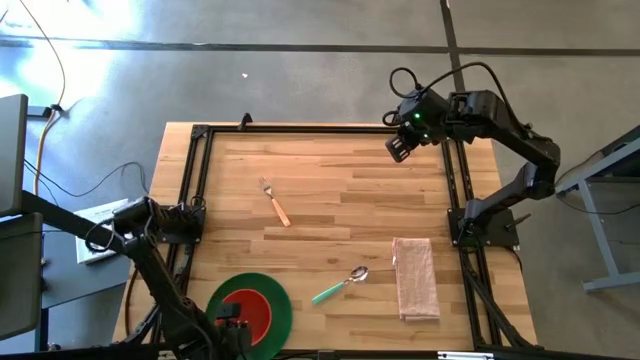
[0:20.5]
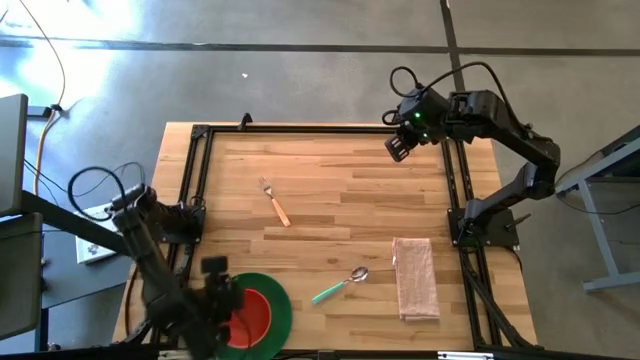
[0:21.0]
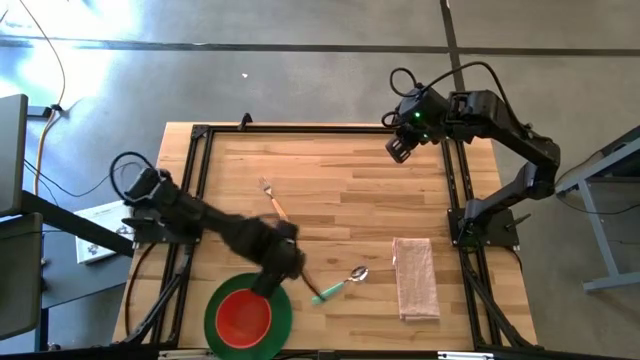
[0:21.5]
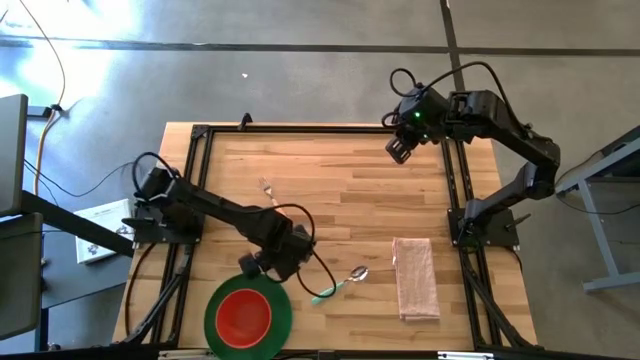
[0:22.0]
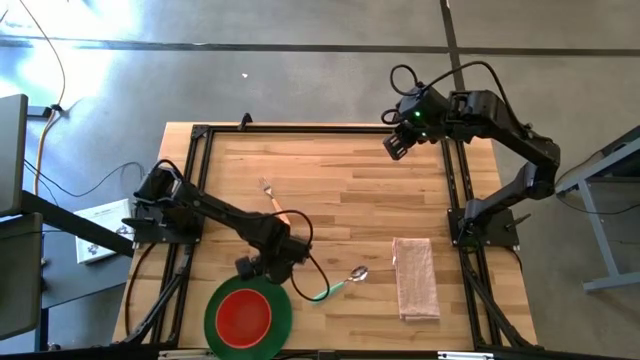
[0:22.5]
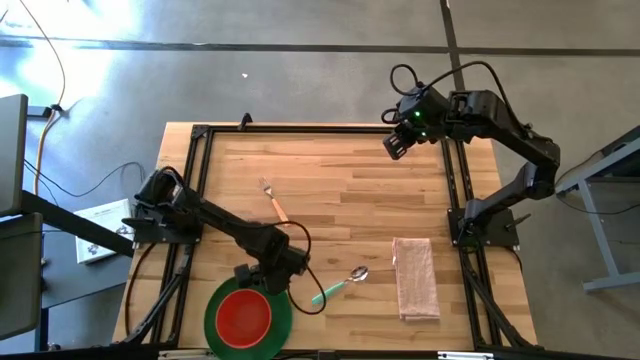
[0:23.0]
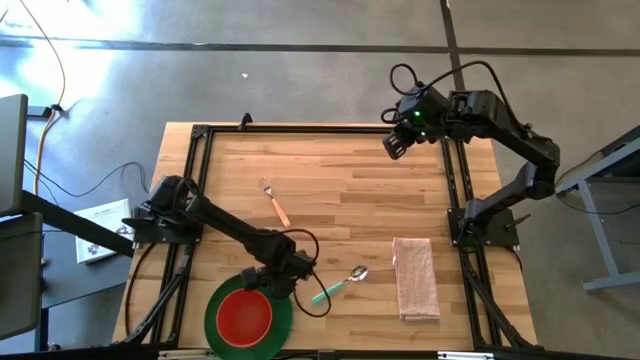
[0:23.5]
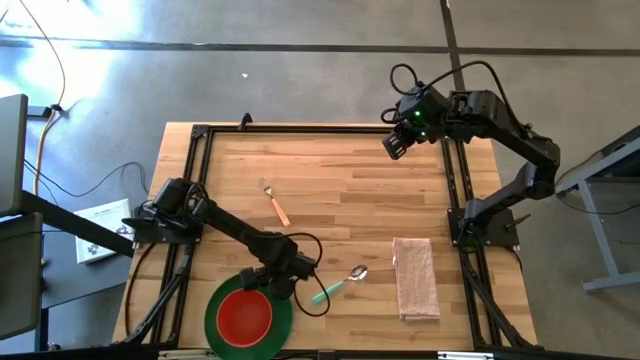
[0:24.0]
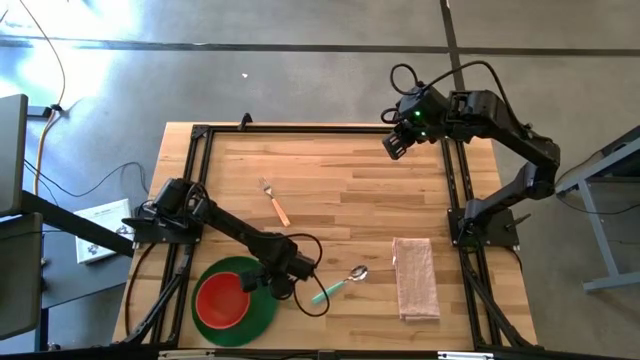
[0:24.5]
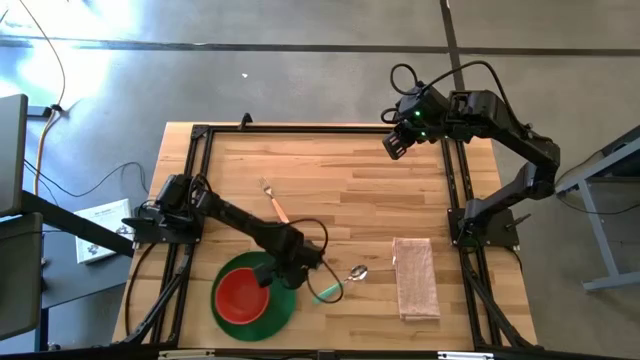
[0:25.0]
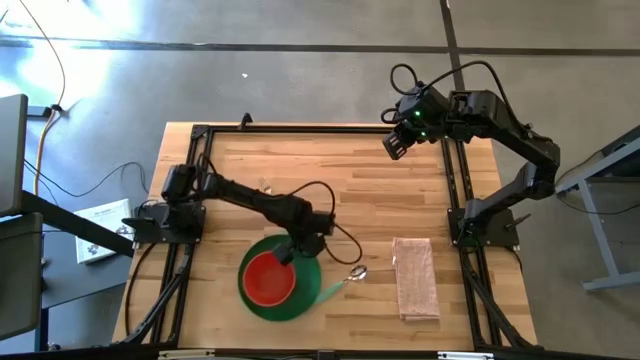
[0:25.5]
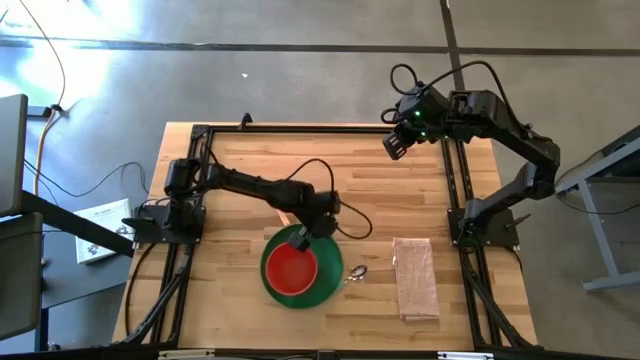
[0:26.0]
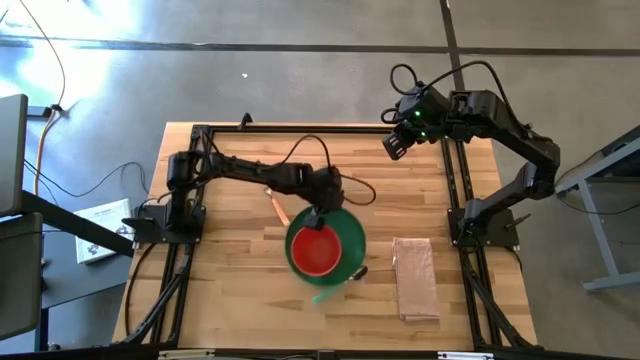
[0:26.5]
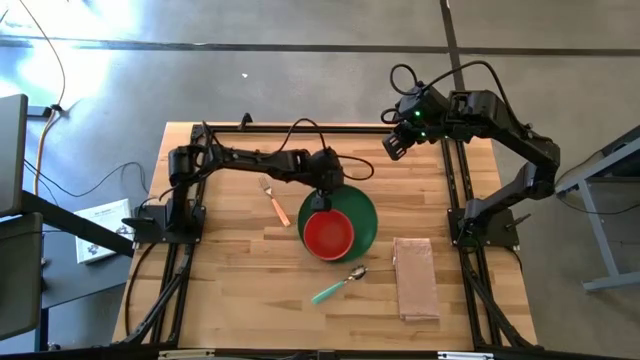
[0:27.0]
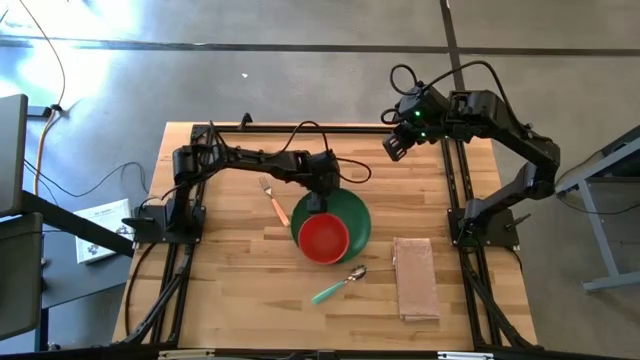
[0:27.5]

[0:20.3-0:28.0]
Task: Set table place
Move the green plate to the center of the table

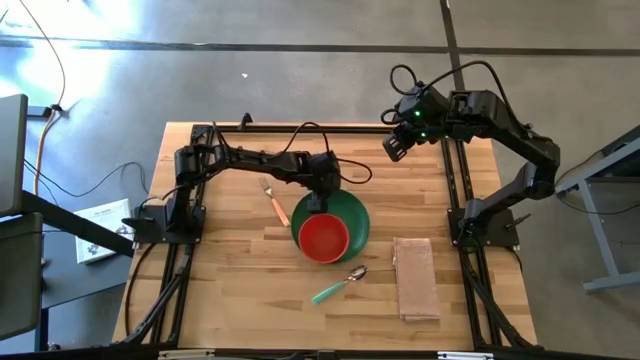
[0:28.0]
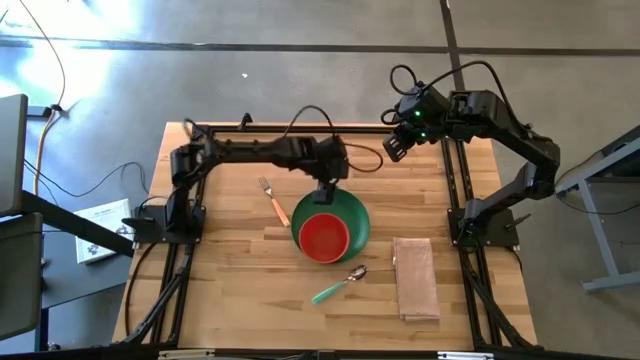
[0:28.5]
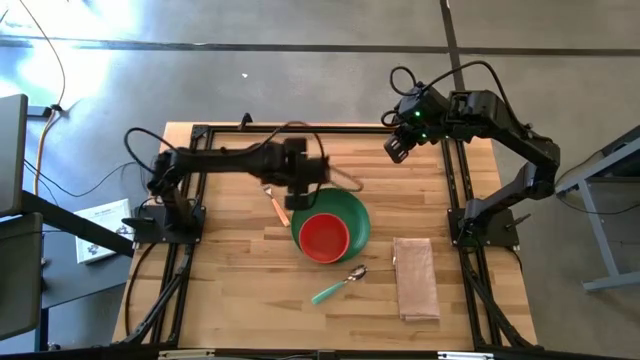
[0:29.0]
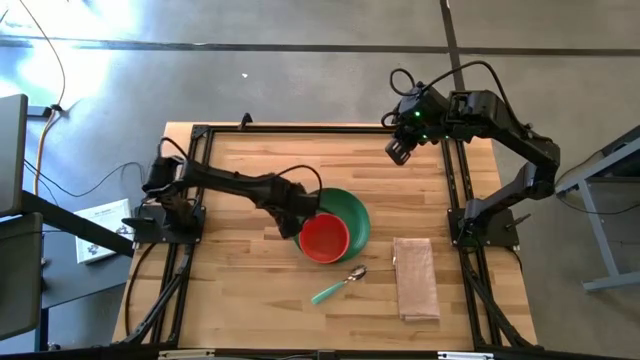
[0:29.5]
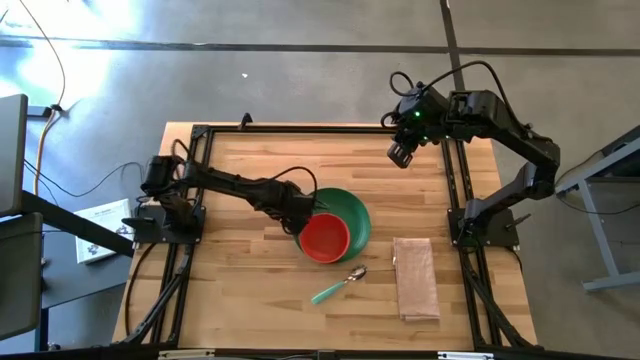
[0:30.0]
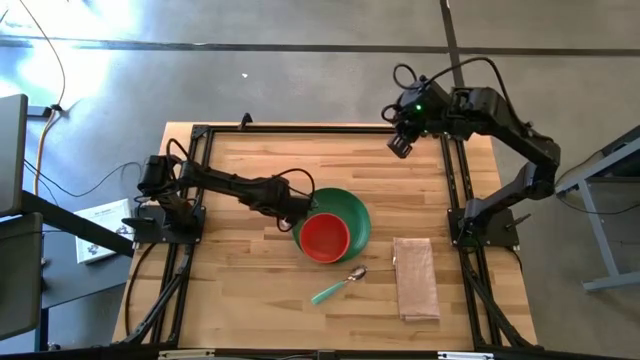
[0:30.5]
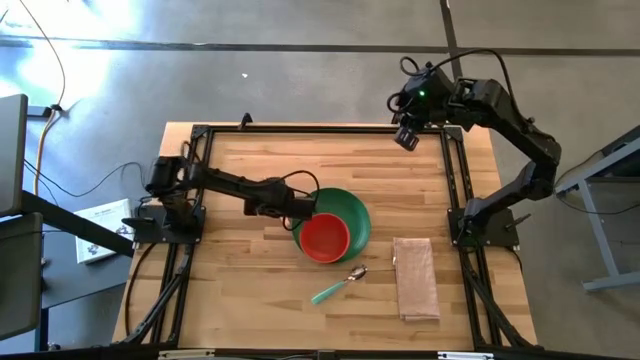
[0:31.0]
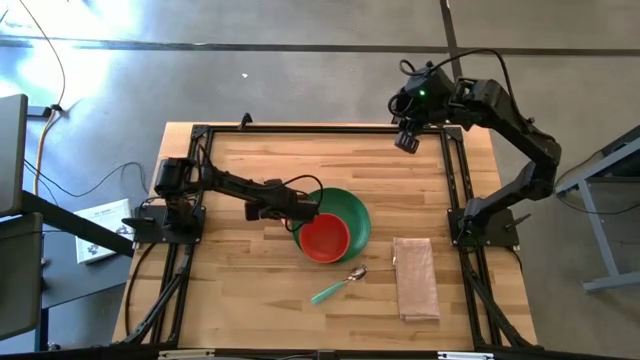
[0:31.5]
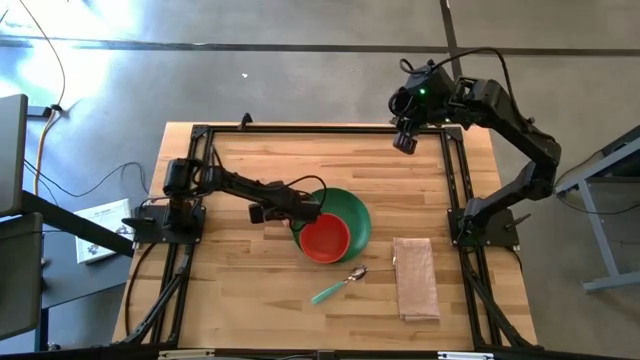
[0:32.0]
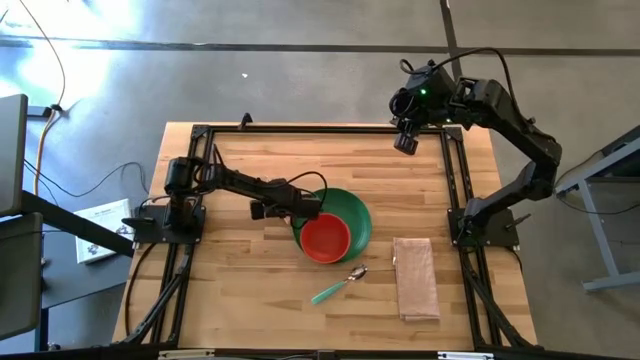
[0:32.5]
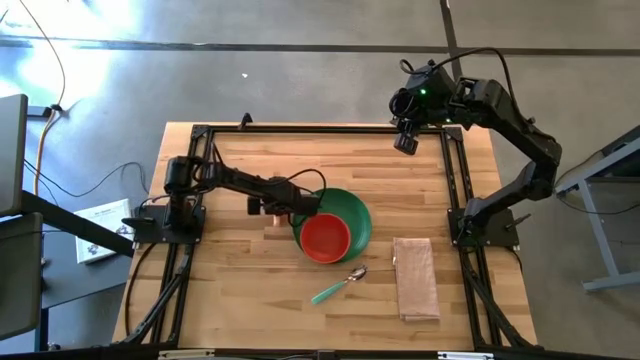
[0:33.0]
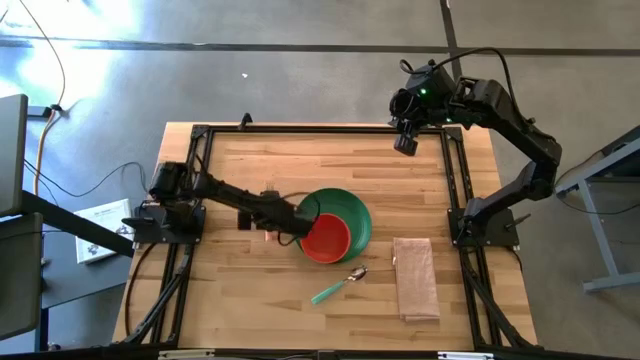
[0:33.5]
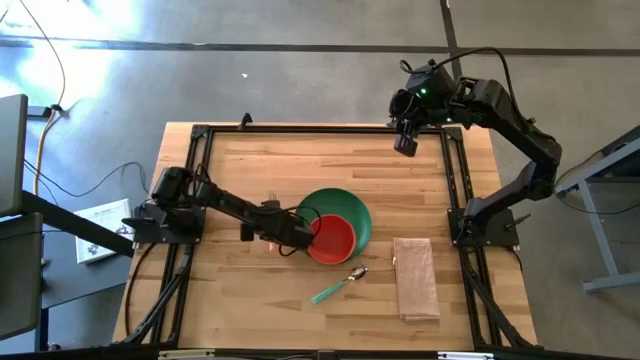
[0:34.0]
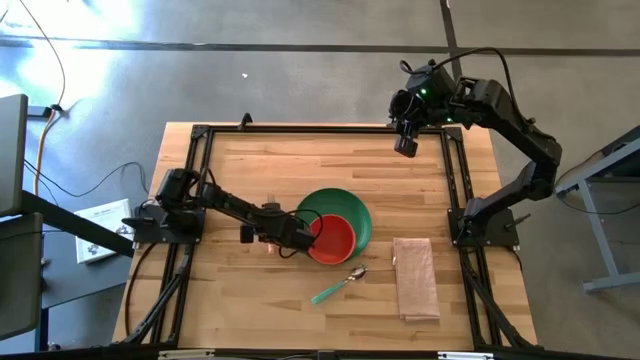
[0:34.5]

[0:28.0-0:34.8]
Adjust the light orange fork

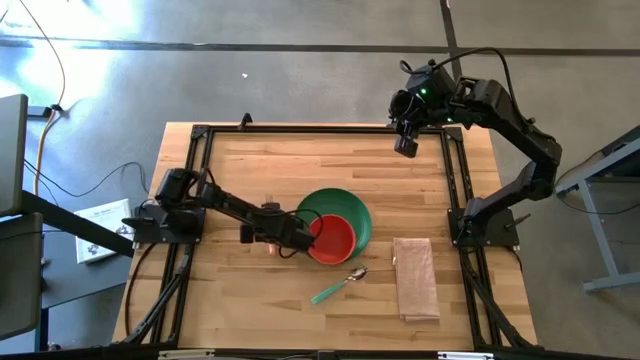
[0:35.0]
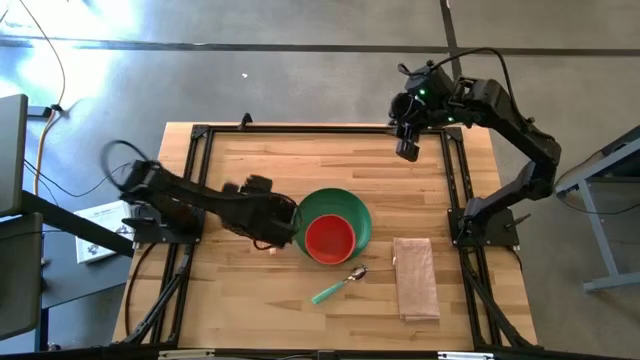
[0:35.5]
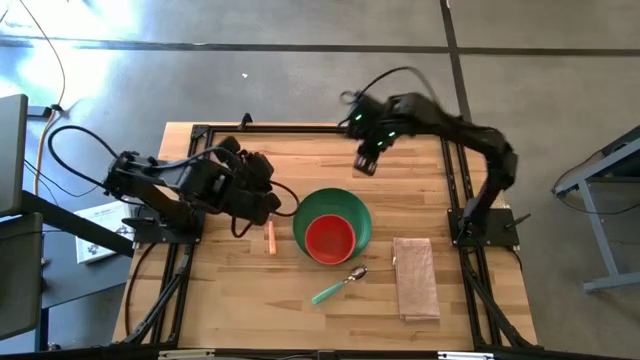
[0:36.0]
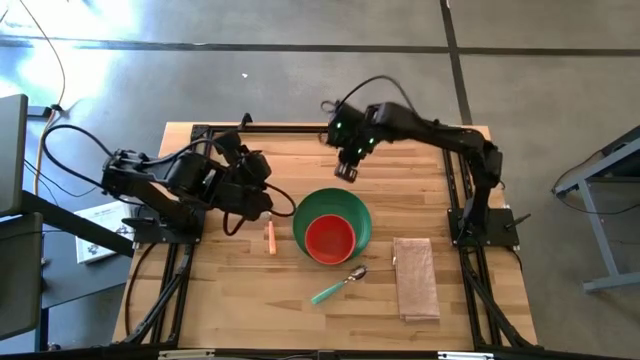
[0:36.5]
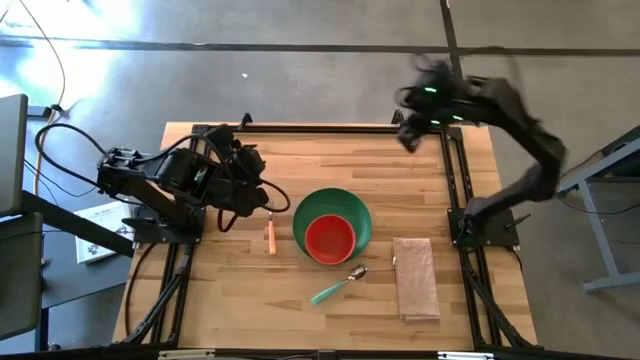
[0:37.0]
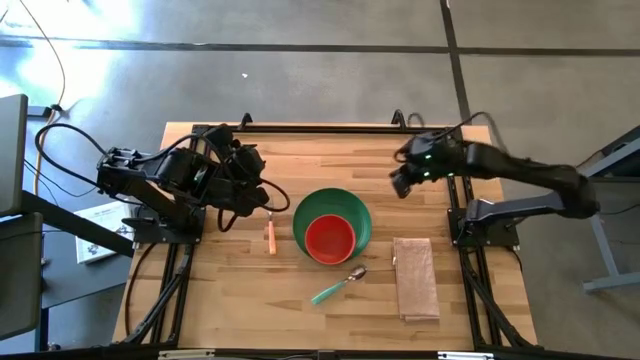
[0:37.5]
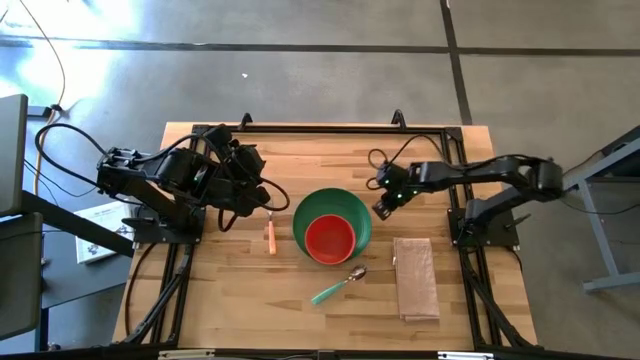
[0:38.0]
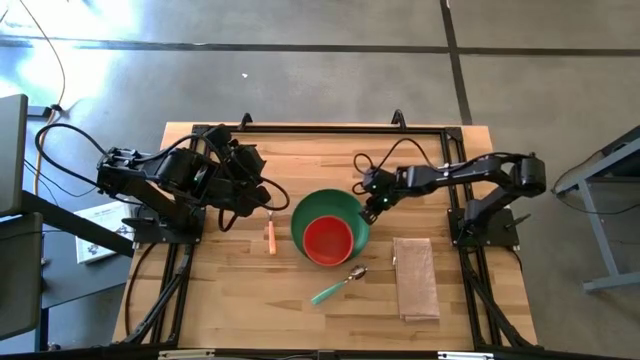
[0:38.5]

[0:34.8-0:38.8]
Adjust the green plate

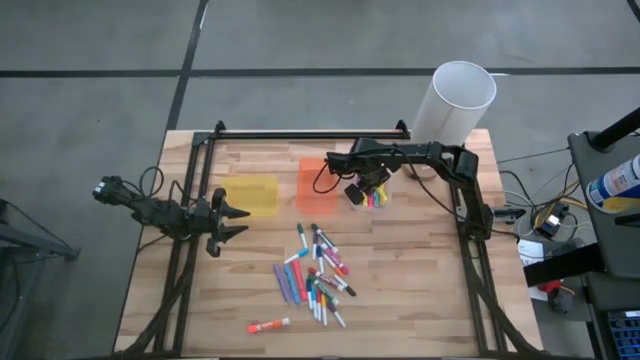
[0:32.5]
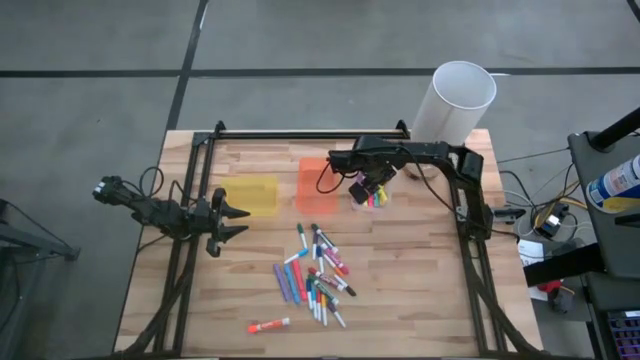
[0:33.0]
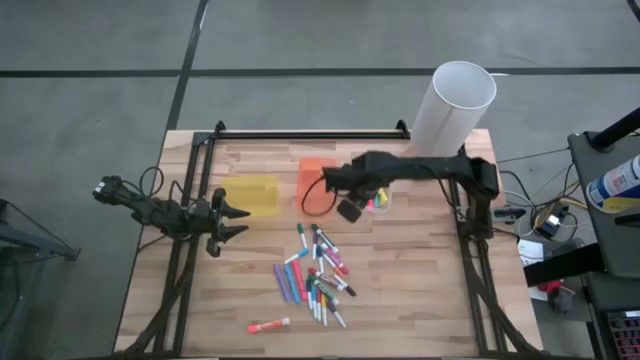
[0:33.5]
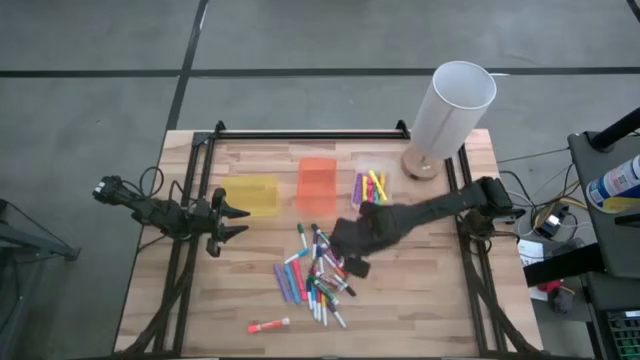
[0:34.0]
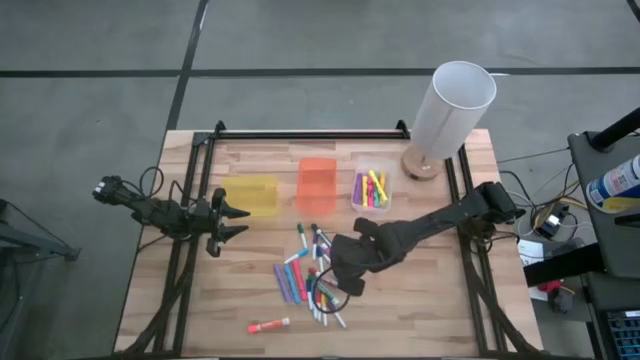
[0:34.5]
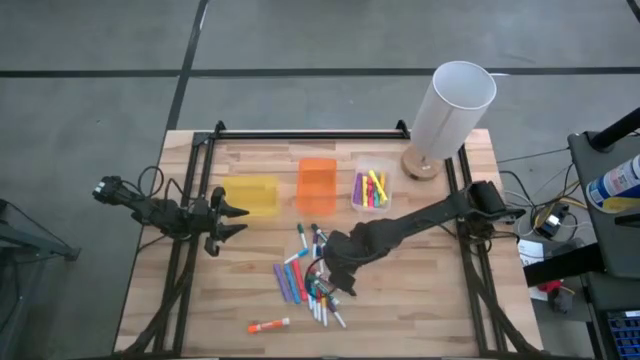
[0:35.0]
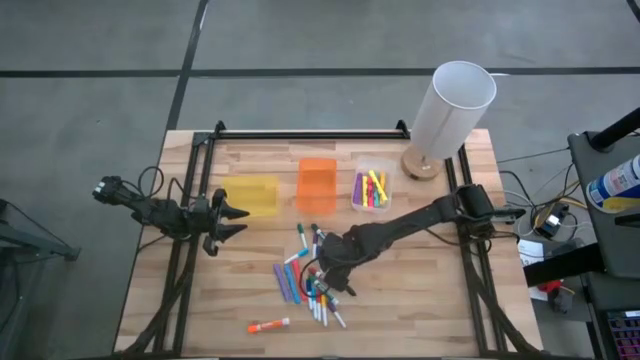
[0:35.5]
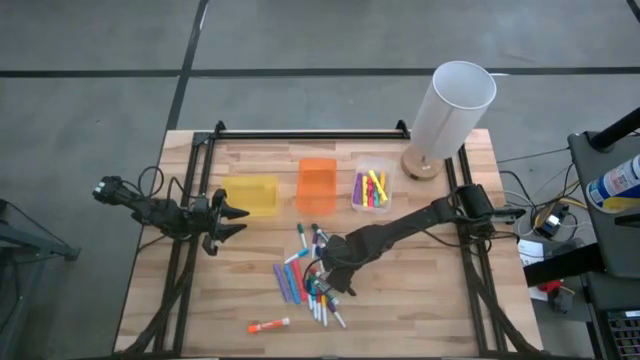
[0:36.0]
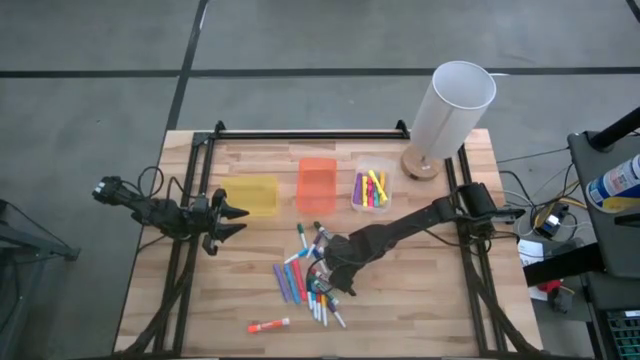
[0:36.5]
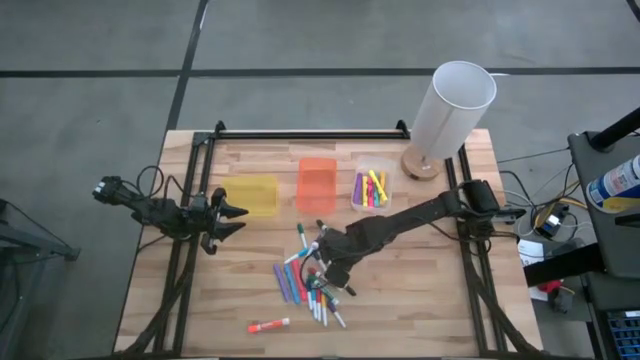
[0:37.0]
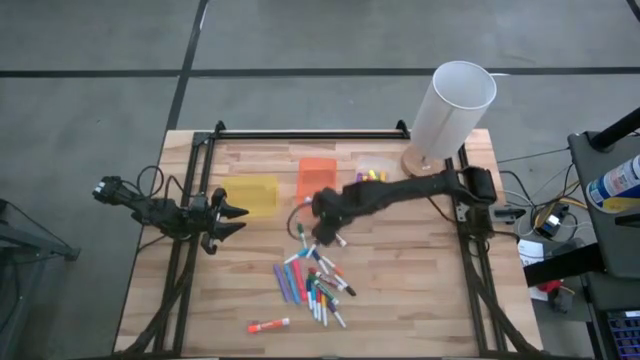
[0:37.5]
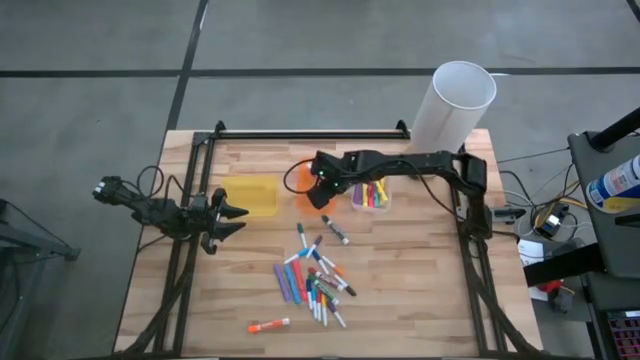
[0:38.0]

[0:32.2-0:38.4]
Task: Pick & Place Markers
Put the pink marker into the orange bin
